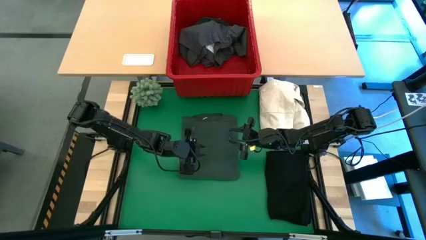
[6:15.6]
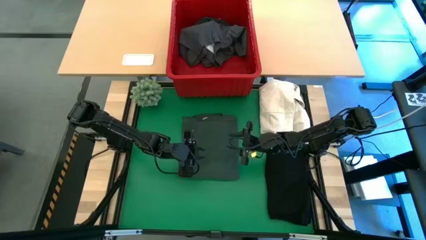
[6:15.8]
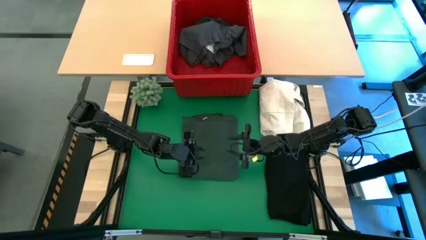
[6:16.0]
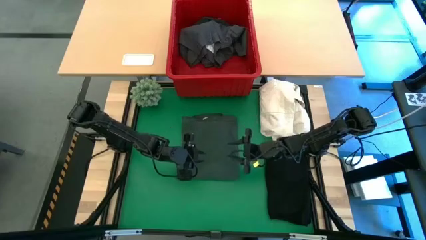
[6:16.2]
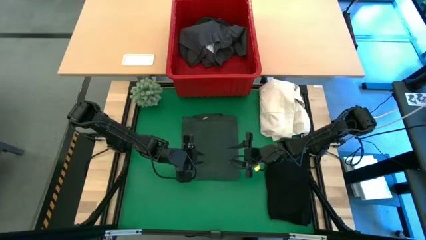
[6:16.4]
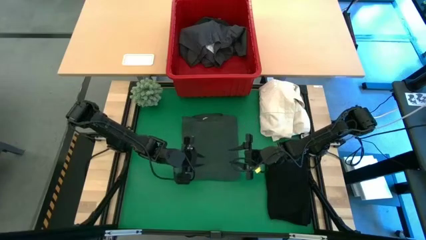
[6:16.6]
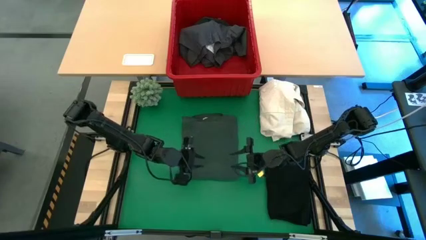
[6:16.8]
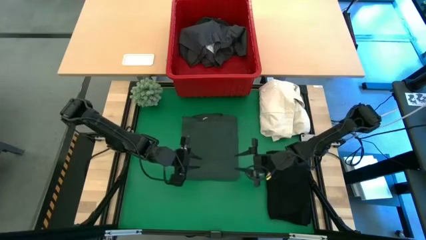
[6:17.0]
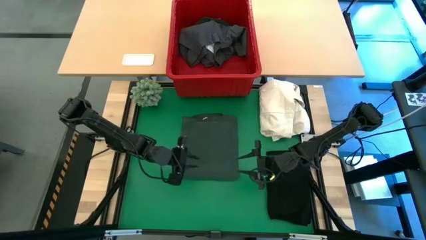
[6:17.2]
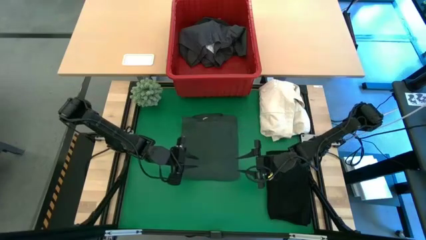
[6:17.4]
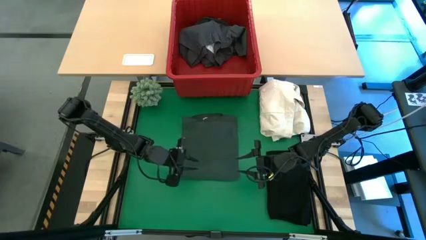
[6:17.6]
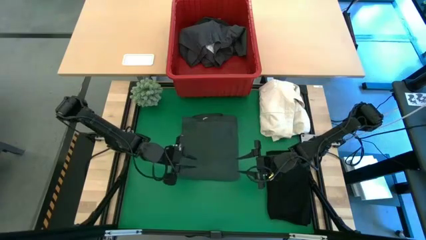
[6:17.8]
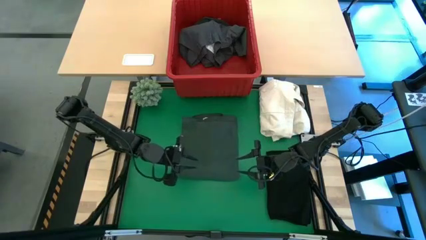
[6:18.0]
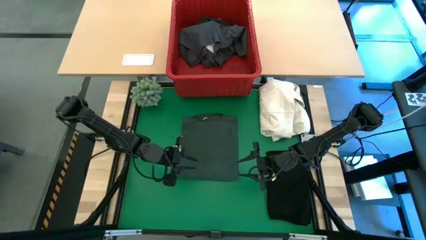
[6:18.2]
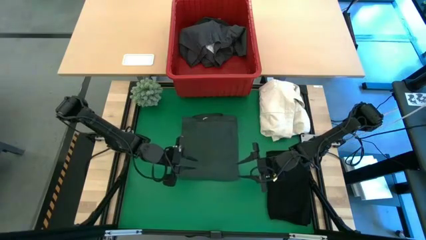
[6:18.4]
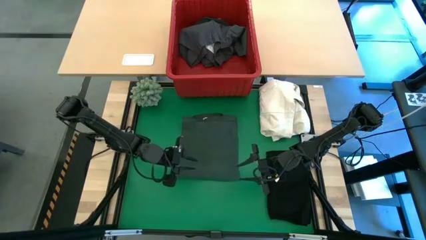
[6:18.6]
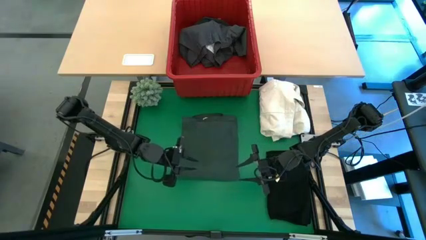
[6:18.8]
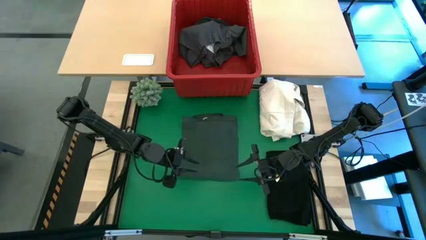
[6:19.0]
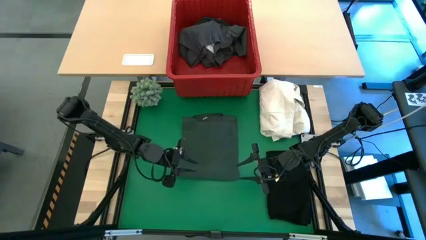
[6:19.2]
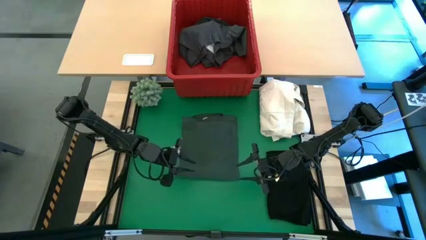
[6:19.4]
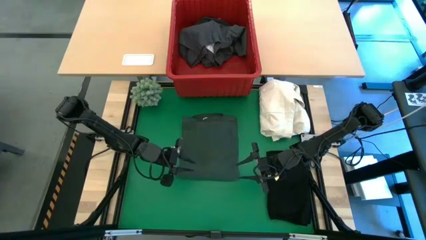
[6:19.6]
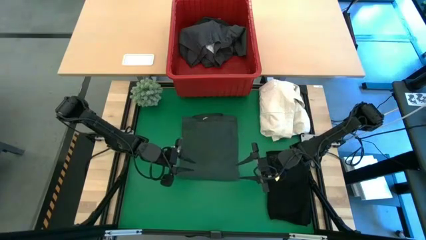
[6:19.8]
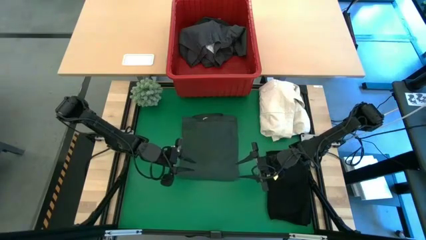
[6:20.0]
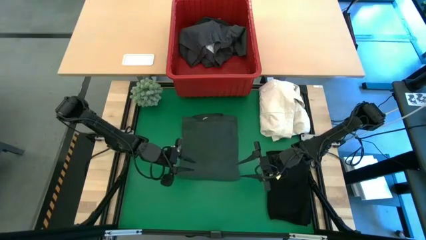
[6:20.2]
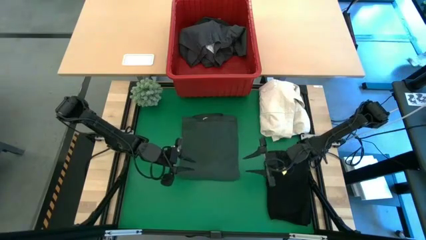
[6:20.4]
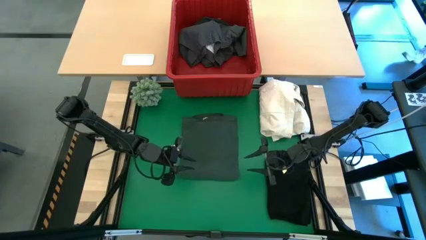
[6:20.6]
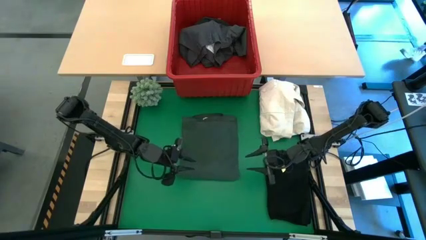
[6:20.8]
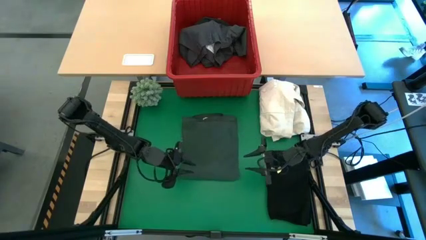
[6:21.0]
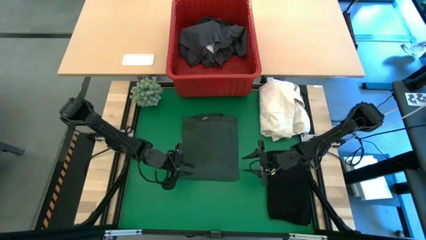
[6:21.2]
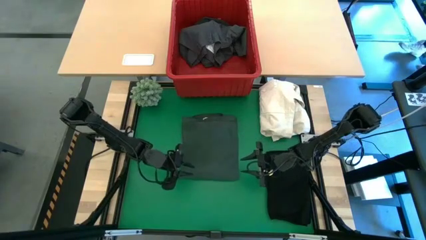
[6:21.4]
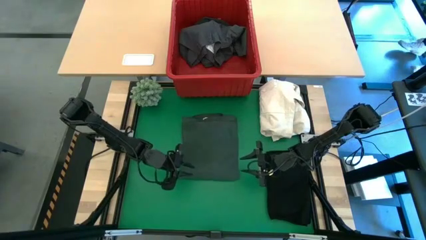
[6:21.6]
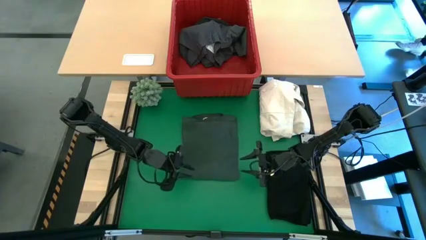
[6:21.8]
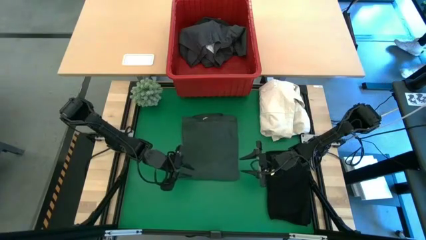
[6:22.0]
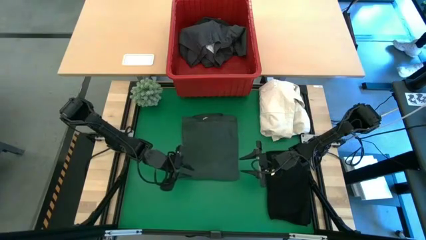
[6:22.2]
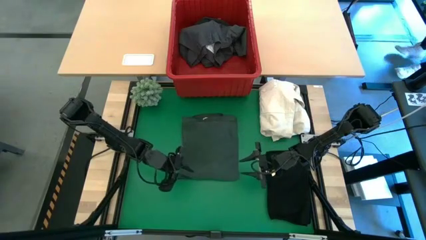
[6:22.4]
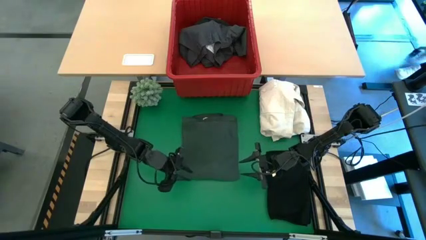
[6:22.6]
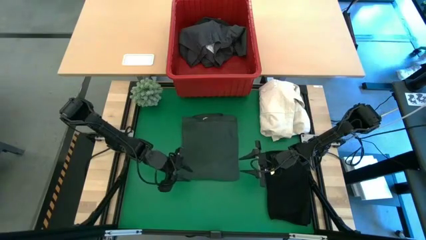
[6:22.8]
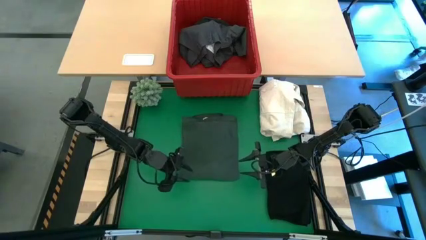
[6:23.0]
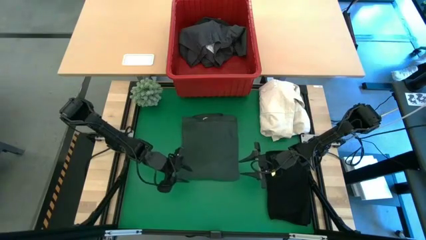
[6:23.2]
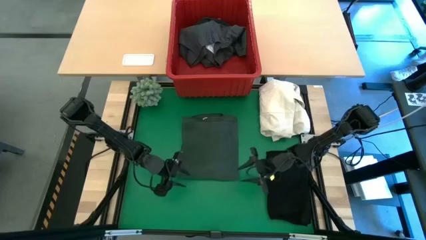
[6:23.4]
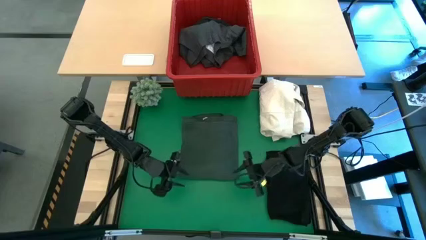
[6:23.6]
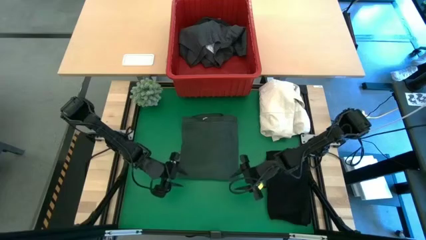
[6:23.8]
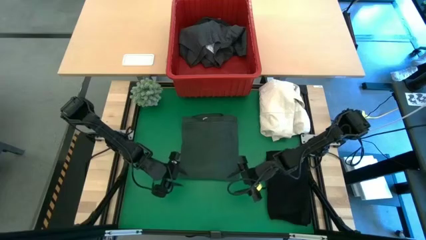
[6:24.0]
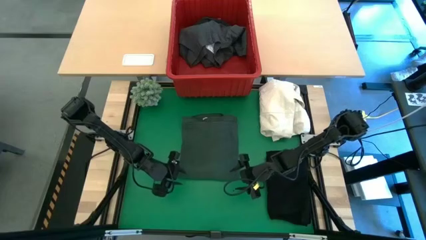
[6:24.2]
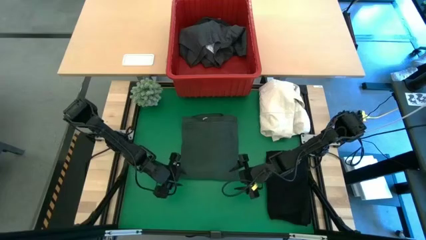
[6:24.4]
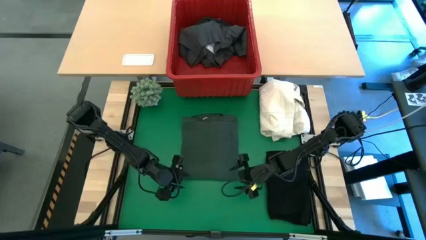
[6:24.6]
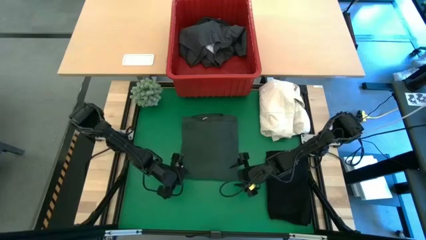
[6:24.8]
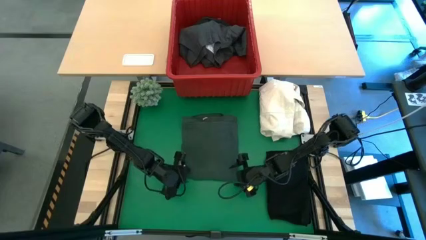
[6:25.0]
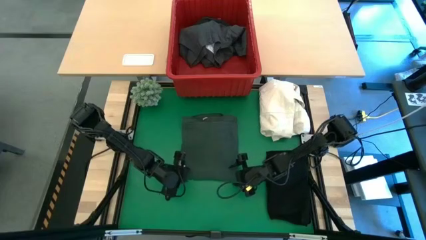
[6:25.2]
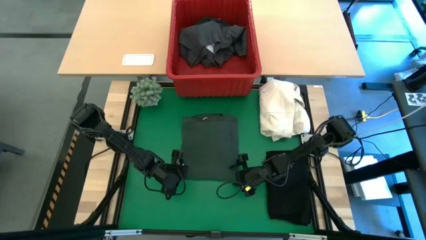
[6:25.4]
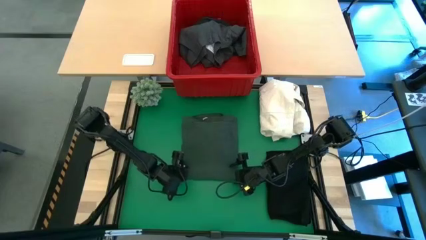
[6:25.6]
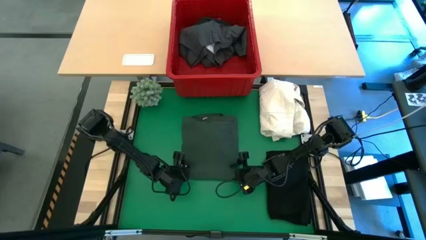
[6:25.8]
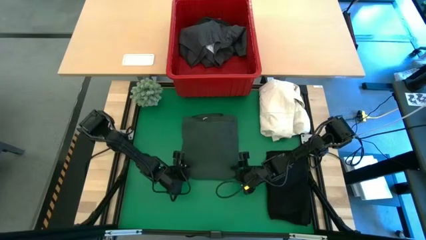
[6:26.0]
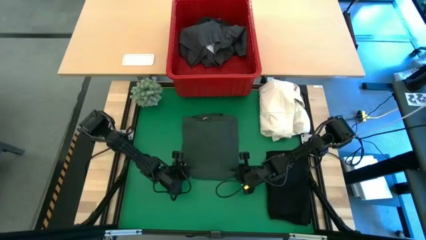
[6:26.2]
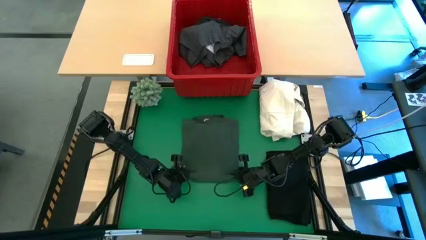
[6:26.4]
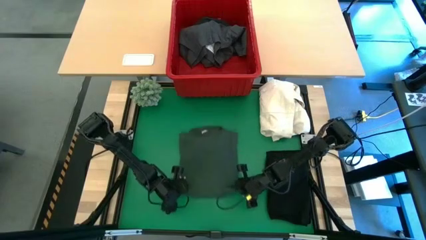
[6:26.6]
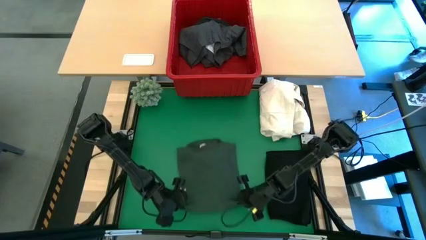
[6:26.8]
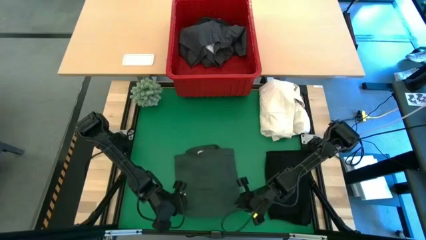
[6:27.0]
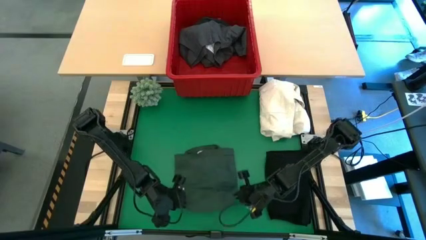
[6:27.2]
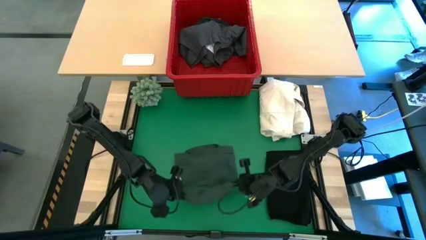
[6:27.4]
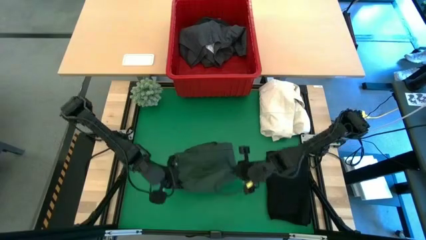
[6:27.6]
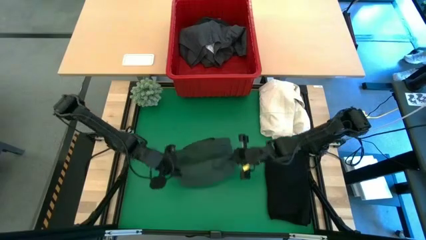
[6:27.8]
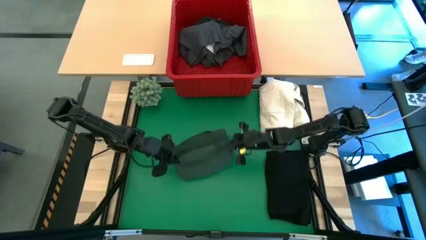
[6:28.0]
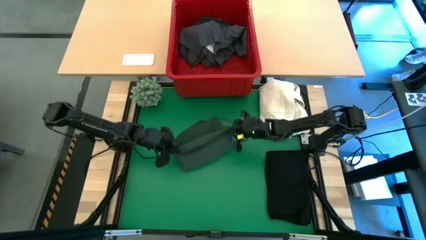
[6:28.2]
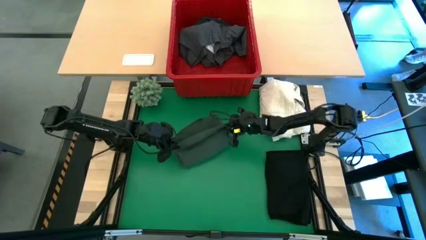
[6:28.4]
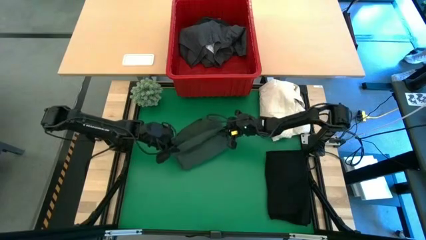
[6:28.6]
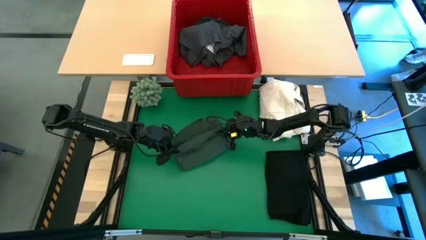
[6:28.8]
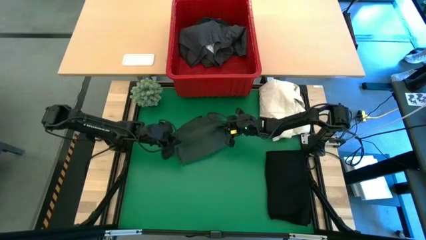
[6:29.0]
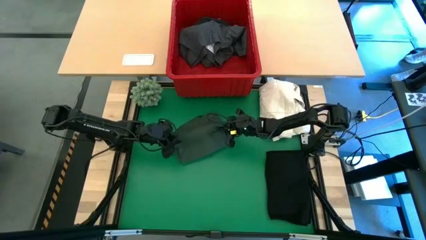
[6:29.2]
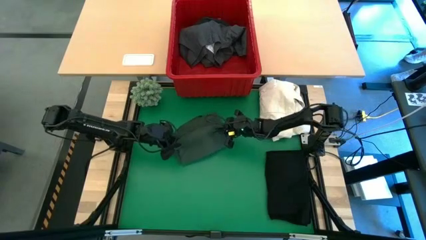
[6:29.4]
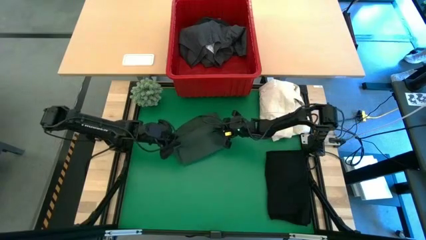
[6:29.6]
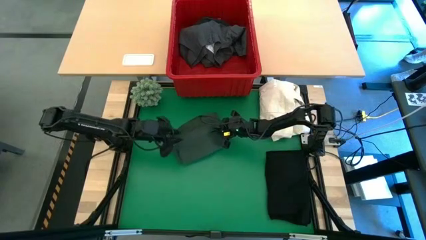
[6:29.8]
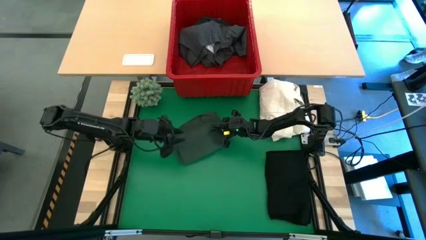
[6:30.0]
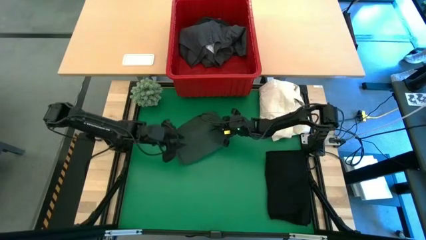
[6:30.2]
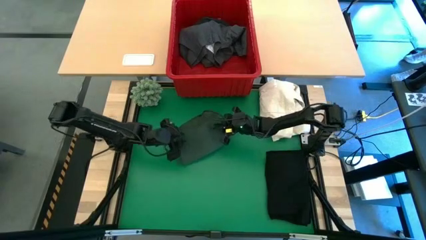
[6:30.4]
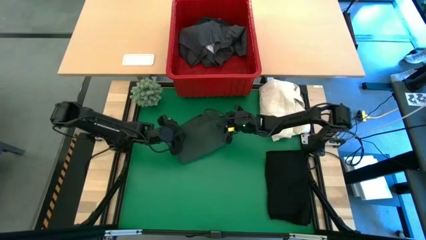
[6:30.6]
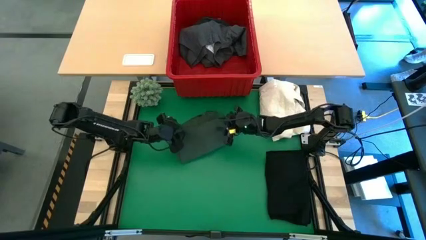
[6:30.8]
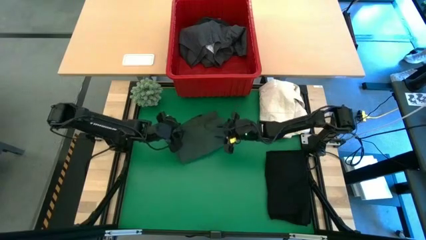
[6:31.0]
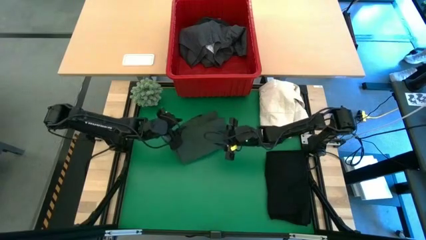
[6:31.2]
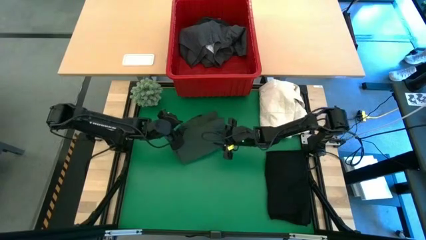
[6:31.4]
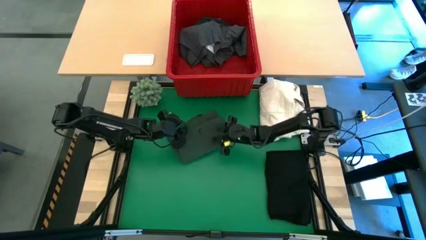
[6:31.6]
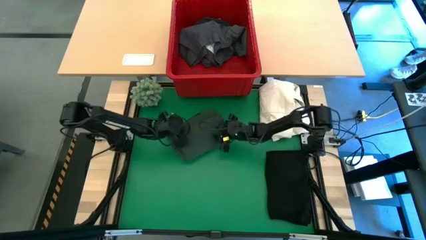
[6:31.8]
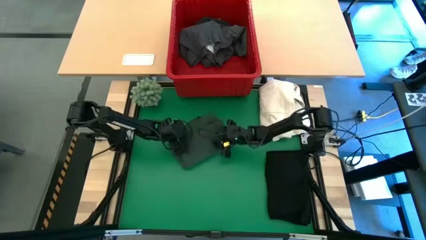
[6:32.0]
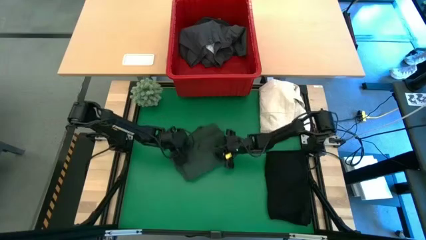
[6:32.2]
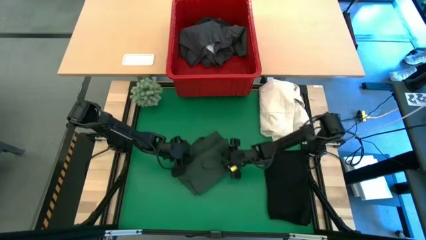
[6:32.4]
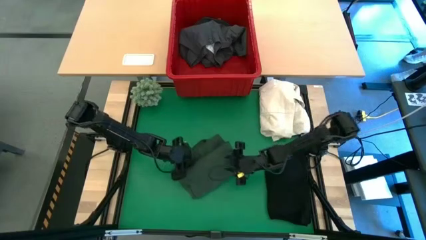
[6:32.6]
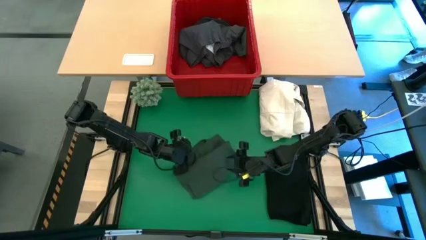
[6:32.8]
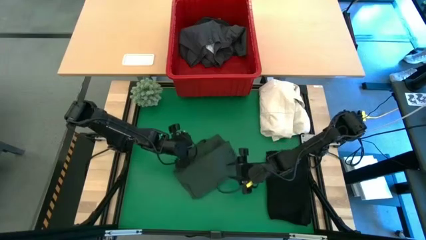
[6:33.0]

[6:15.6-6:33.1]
Task: Fold laundry
Fold the green polo shirt
